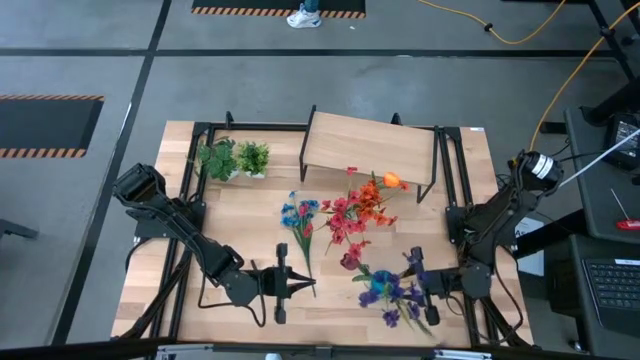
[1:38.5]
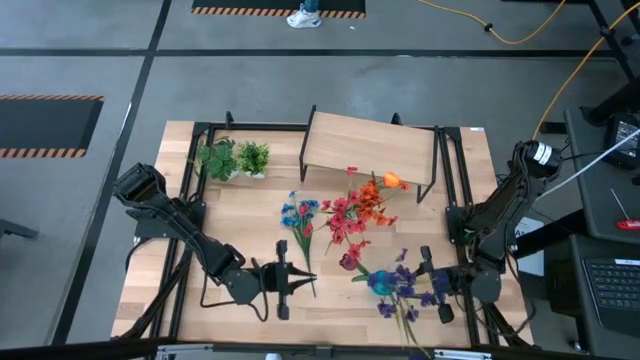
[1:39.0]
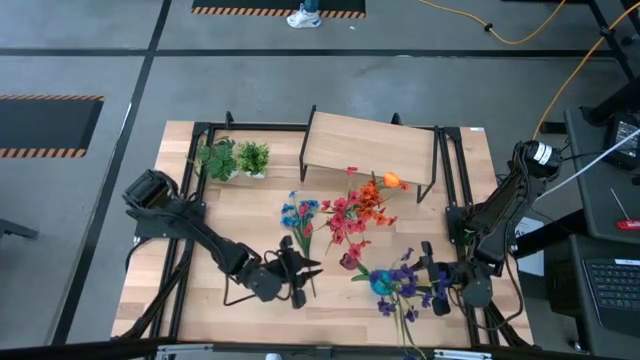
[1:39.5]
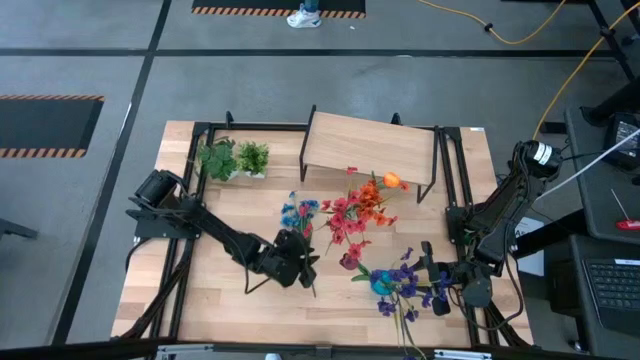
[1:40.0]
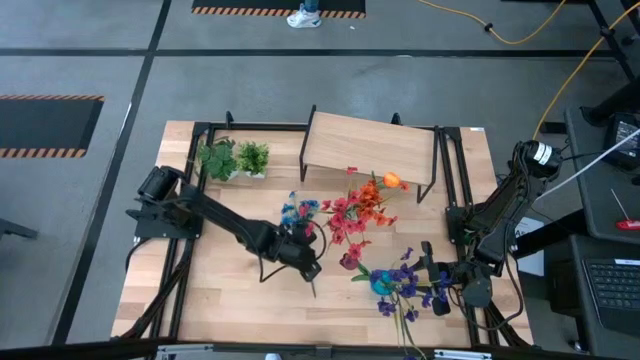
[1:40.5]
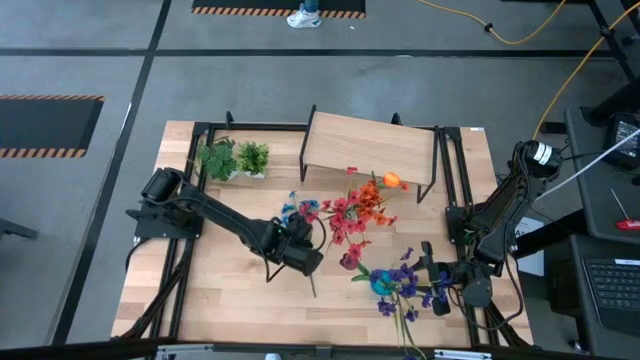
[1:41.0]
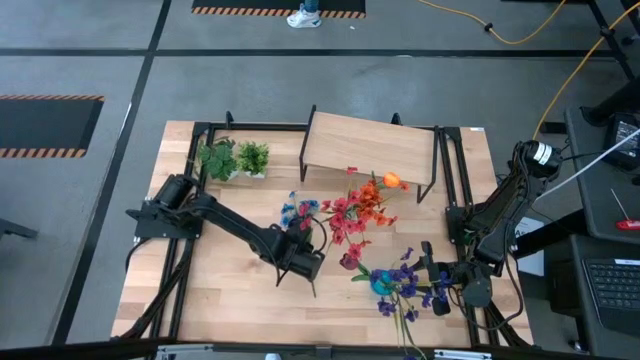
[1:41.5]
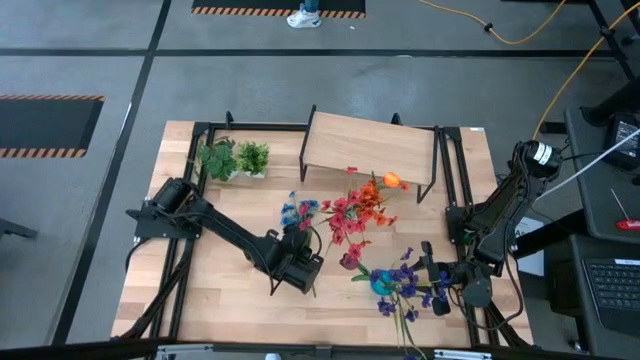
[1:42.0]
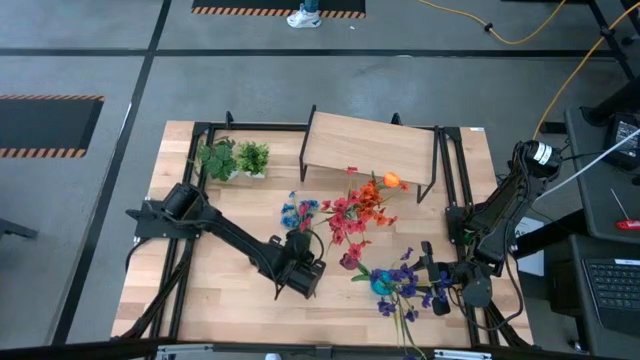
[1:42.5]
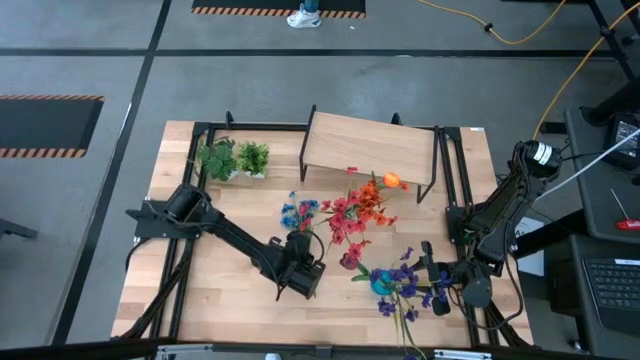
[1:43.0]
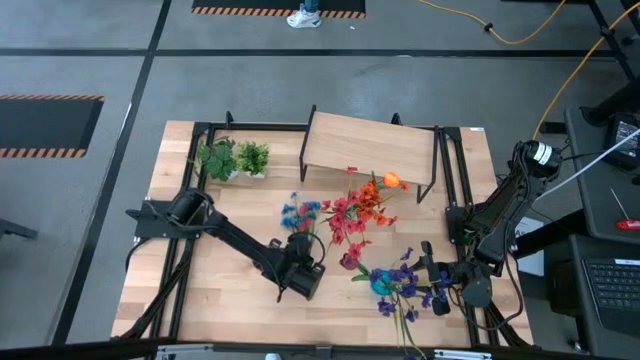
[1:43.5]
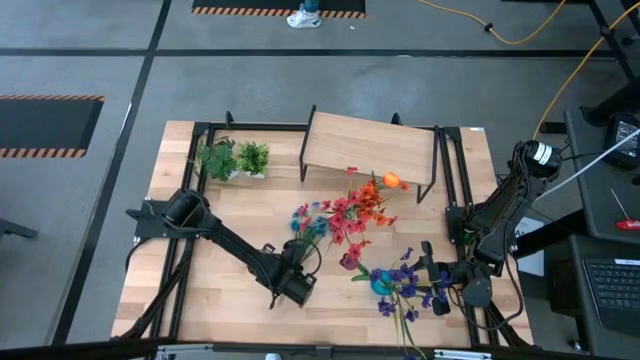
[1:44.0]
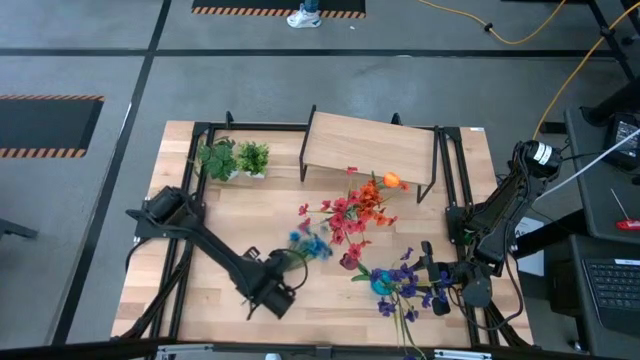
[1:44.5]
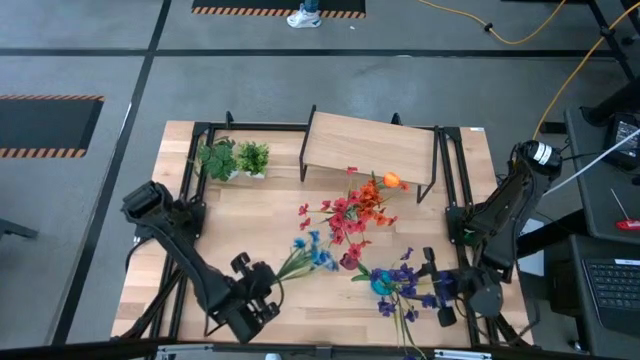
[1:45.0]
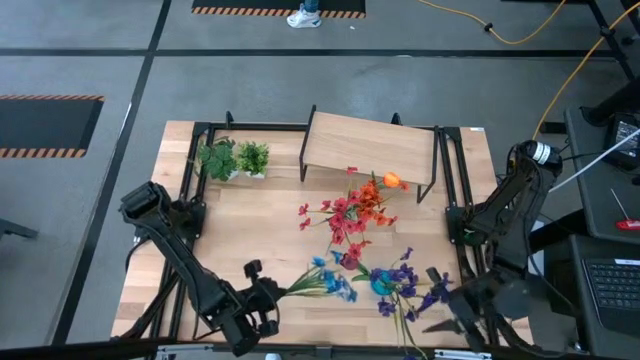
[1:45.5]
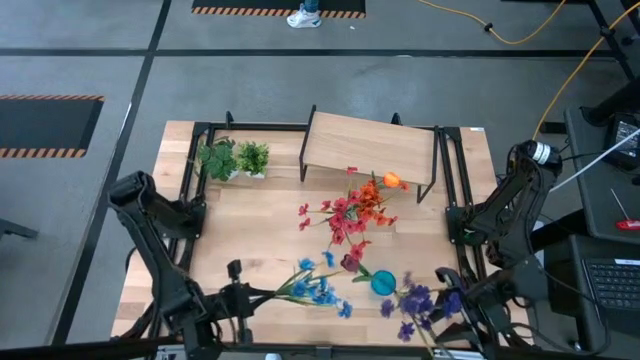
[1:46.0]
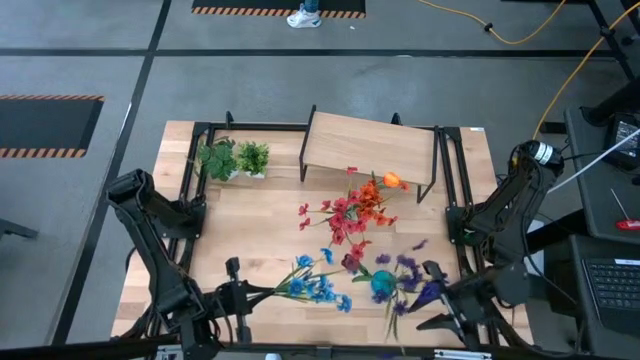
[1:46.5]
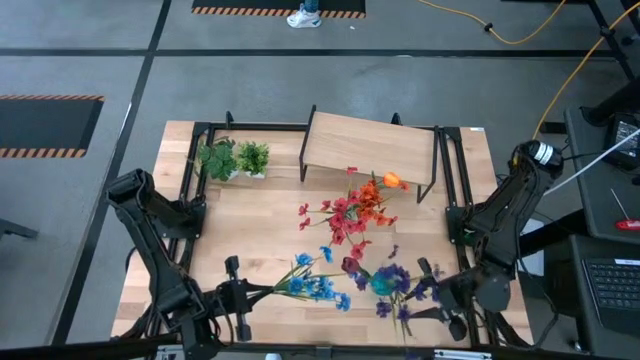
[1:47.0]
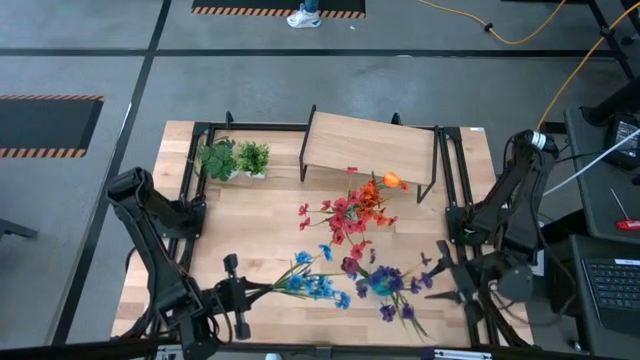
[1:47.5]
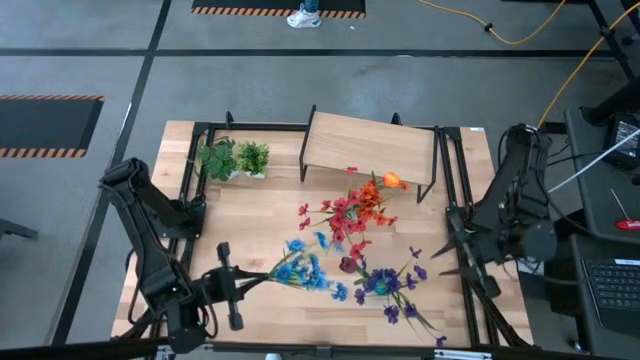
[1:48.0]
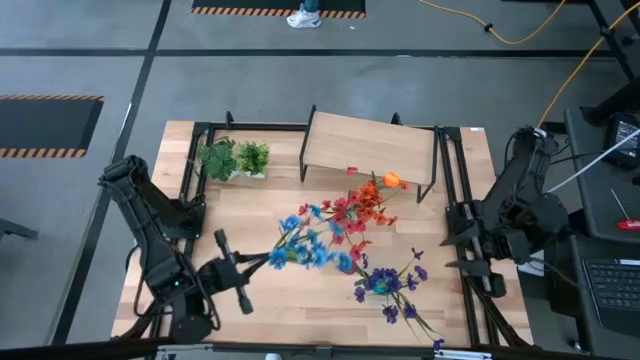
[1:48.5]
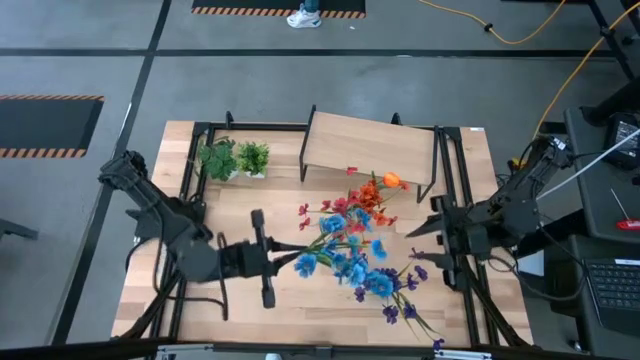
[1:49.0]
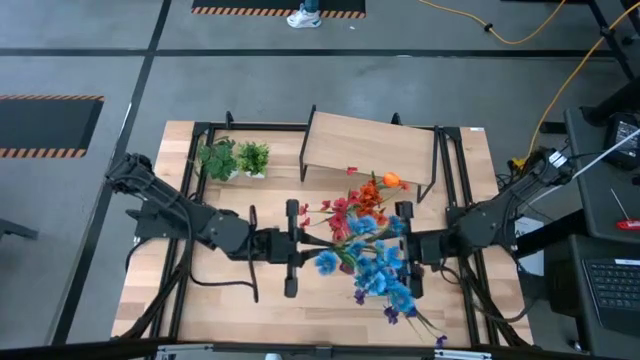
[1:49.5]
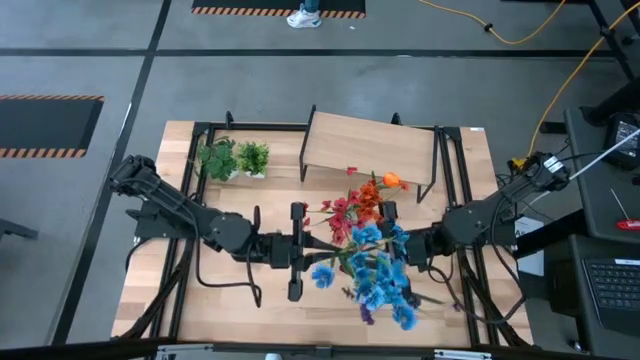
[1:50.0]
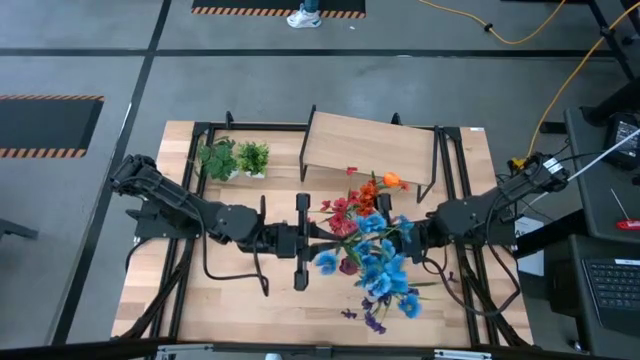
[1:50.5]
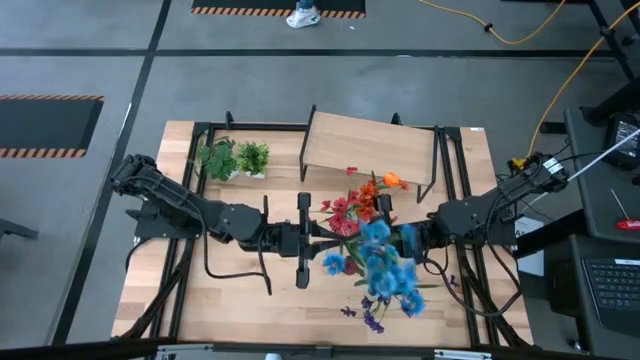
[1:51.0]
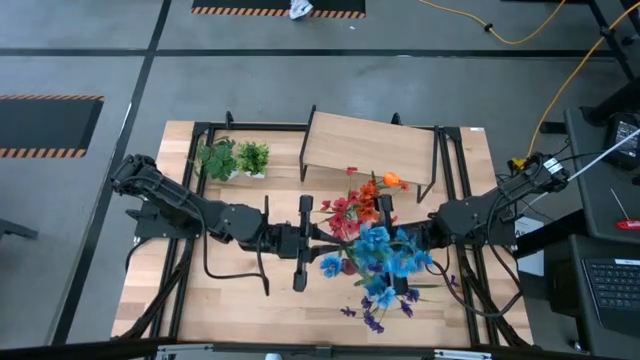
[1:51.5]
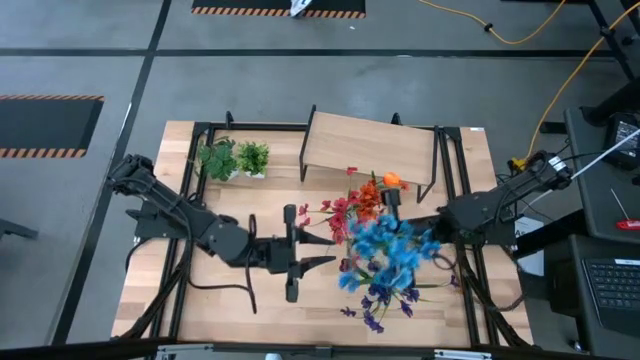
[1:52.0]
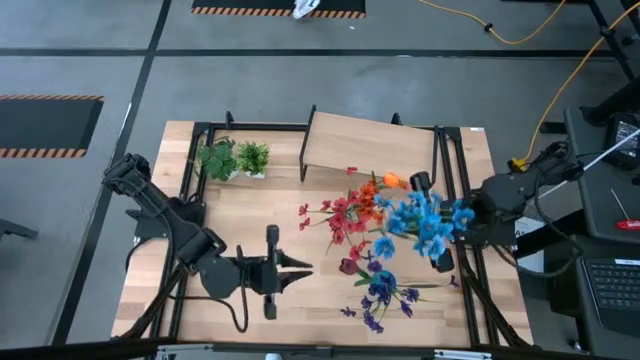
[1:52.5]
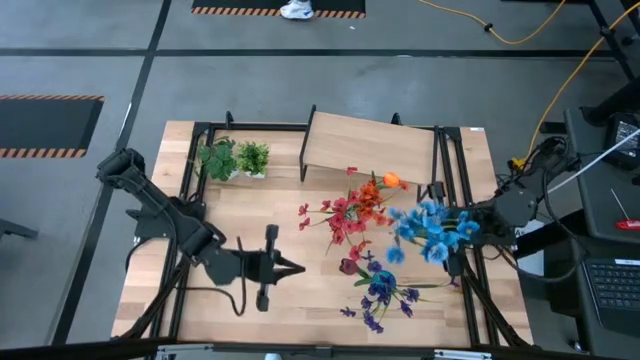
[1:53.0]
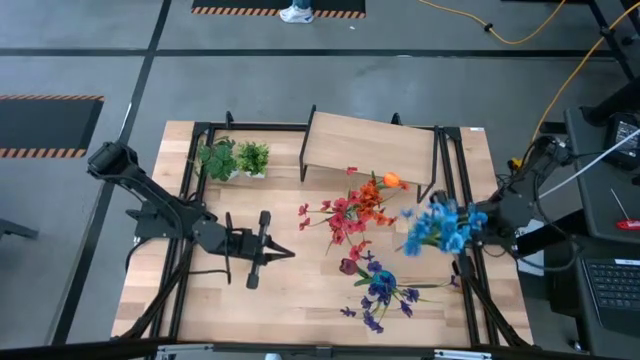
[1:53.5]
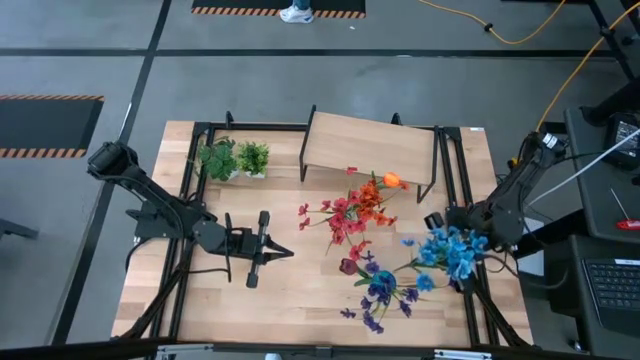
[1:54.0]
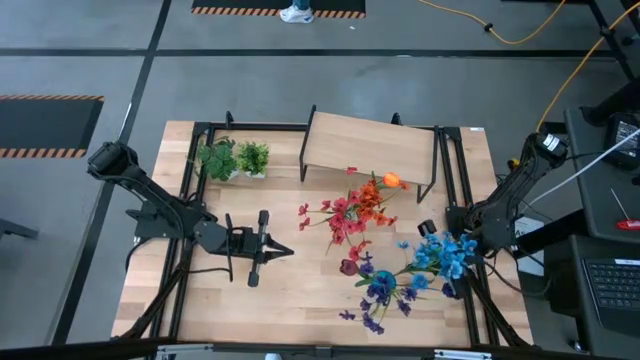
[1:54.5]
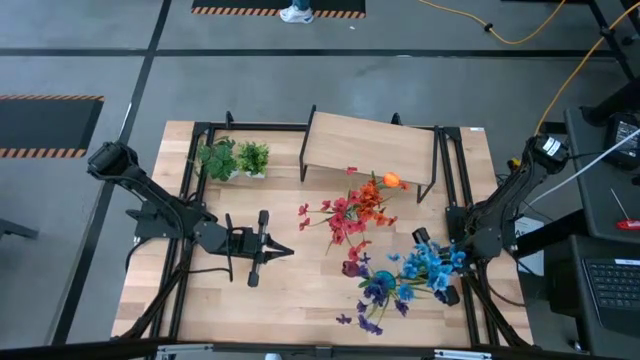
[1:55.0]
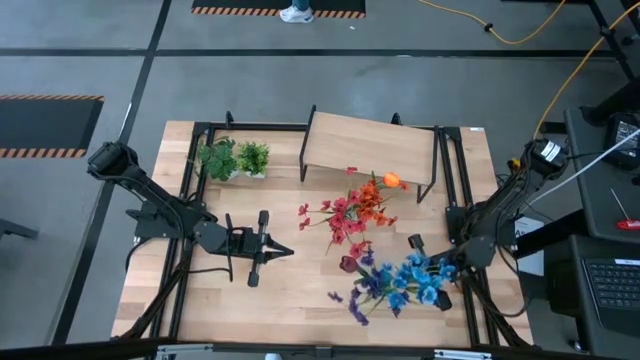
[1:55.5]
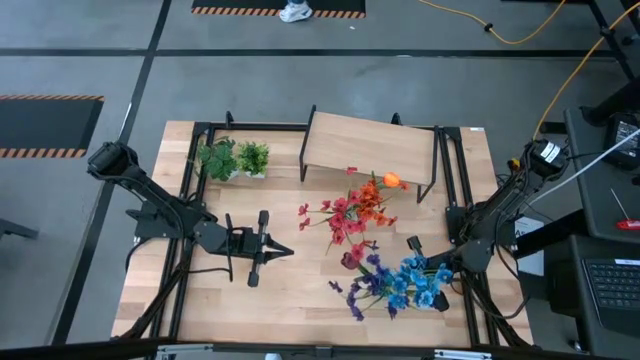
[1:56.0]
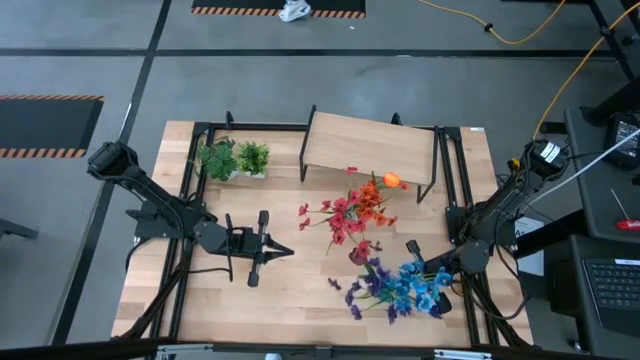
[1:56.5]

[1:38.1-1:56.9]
Task: Pick and place flowers into a vace then onto a shelf
Put the blue flowers into the blue vase
